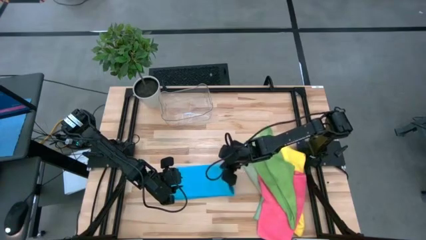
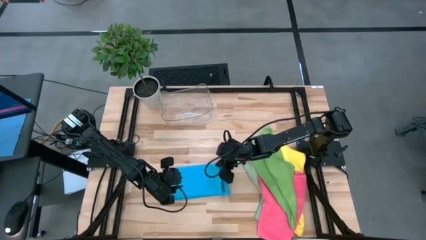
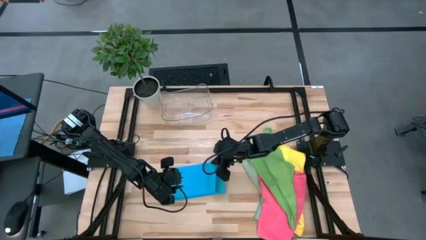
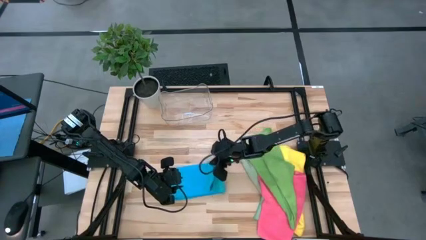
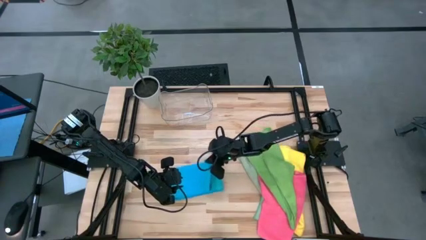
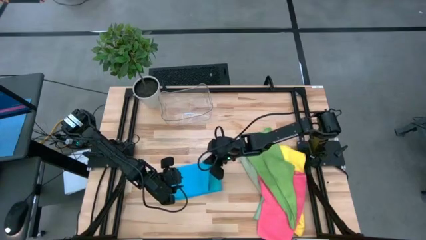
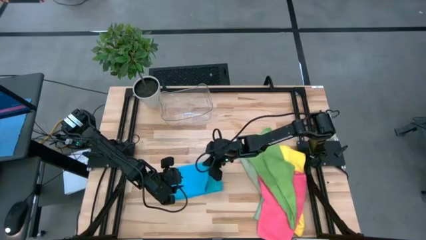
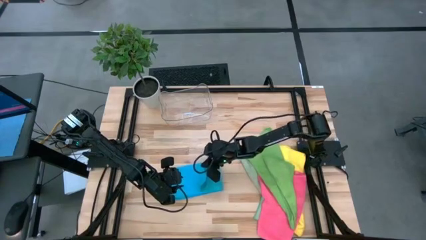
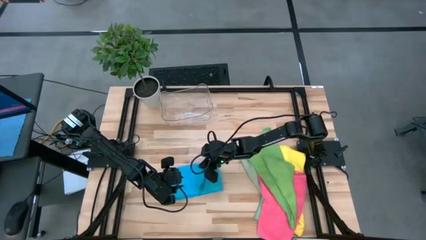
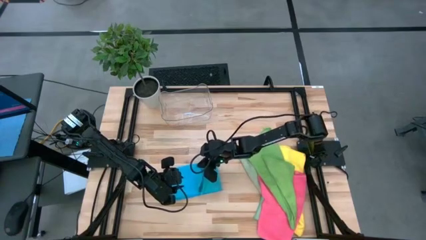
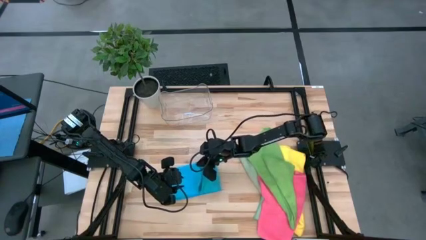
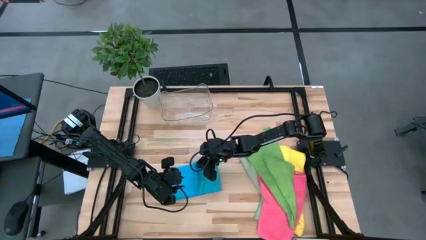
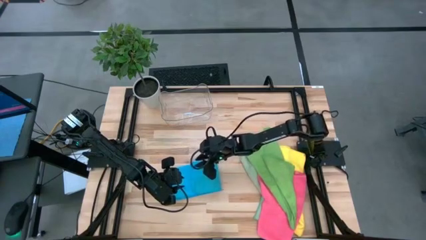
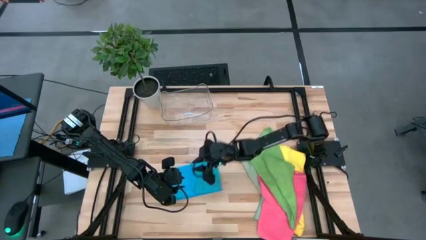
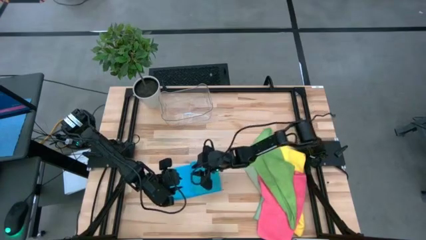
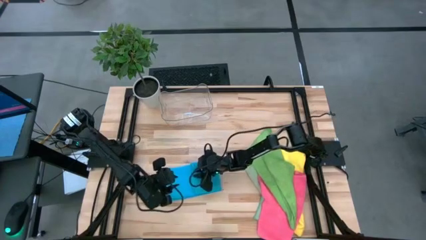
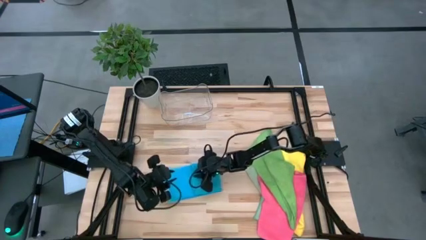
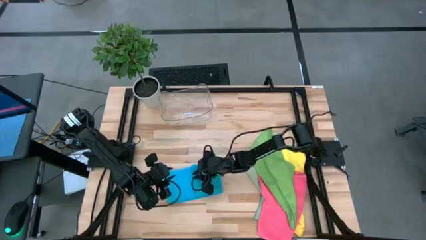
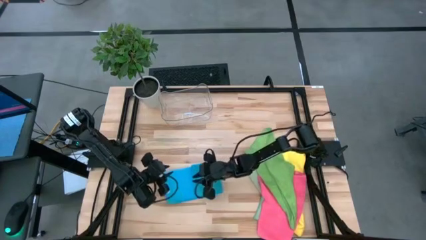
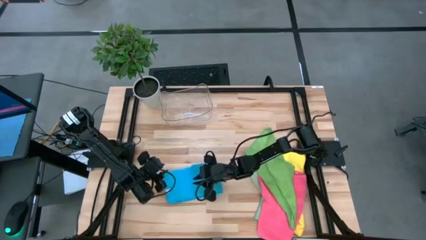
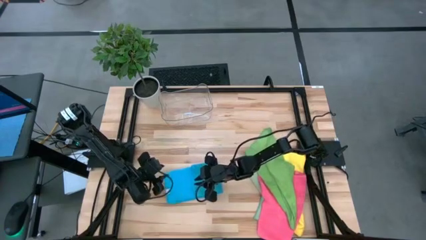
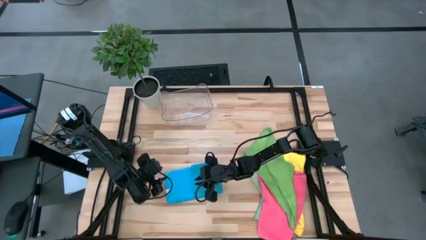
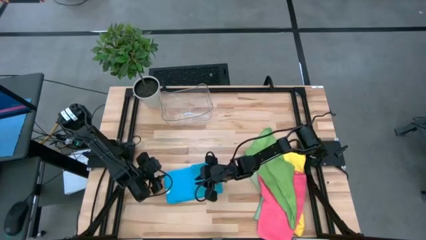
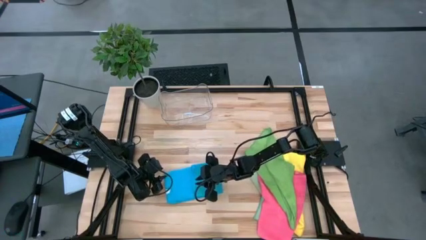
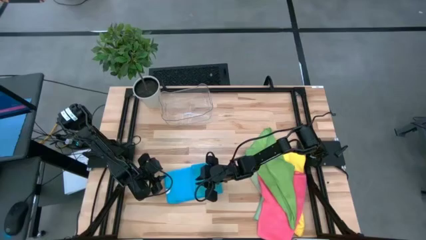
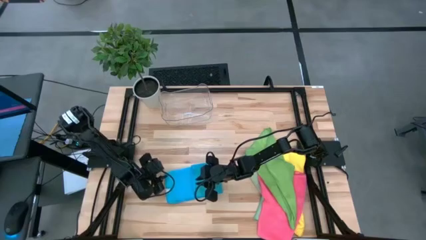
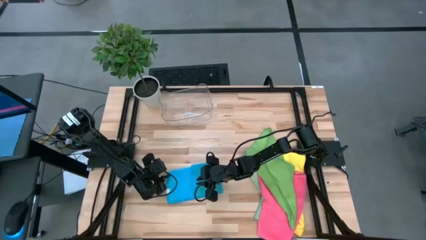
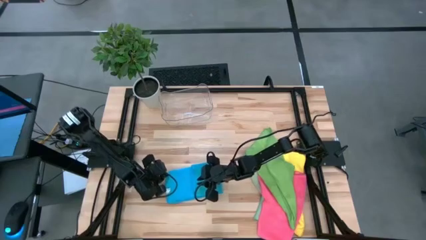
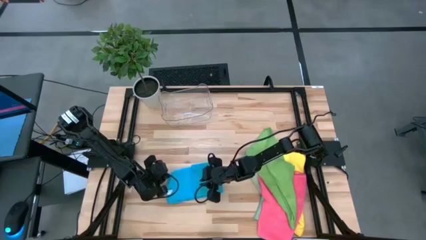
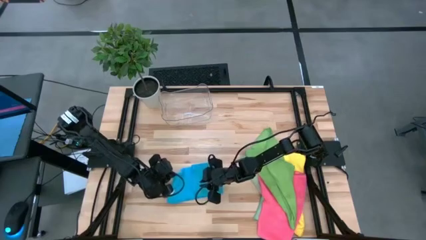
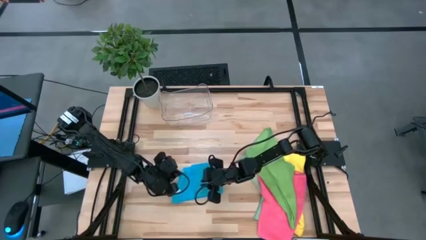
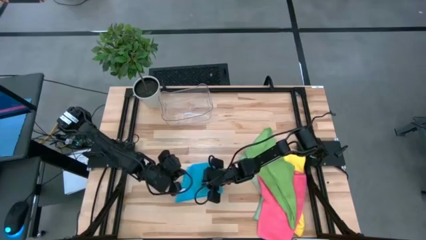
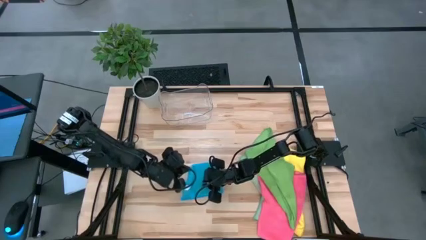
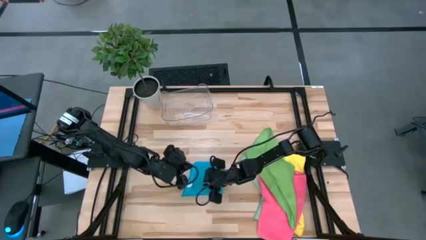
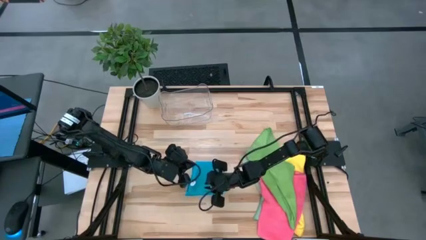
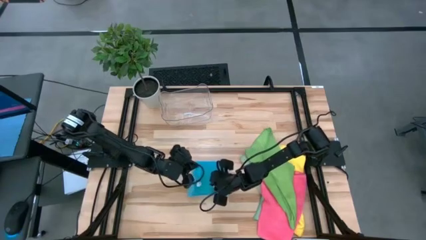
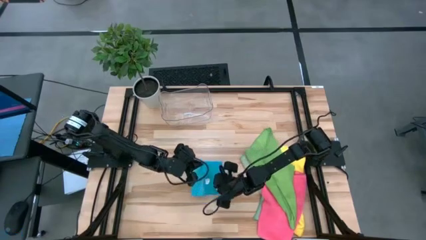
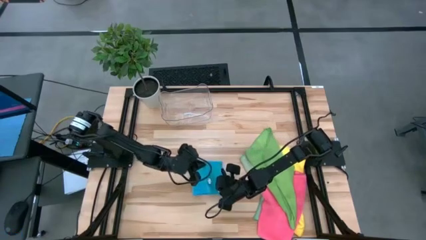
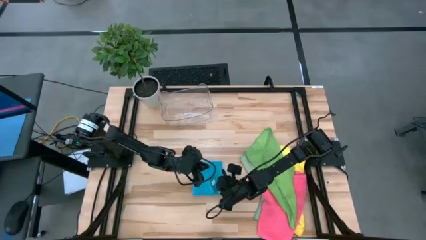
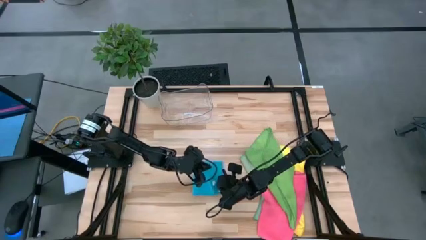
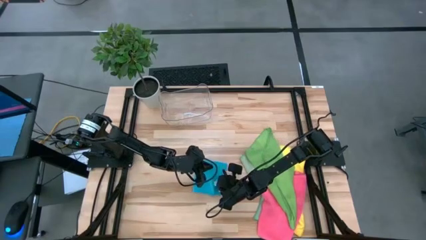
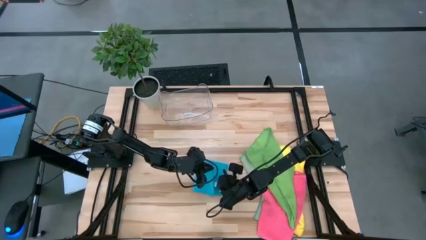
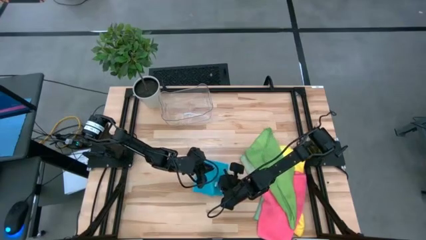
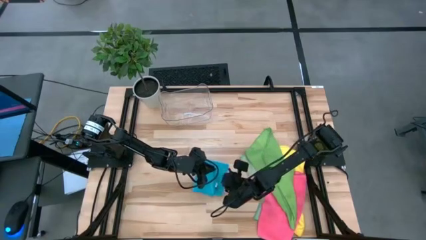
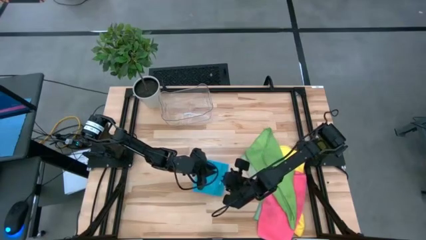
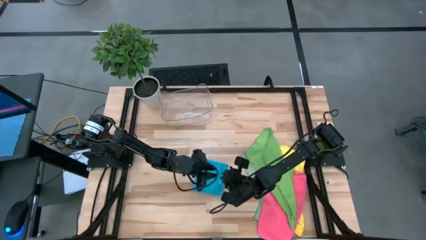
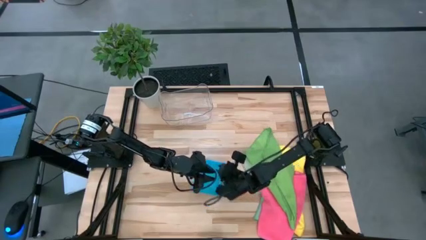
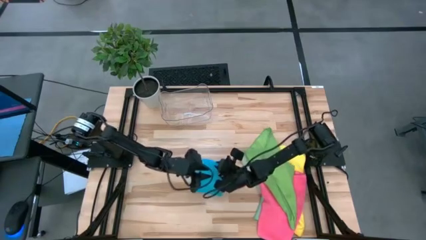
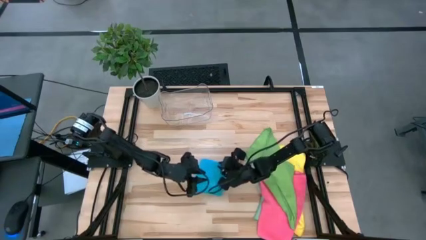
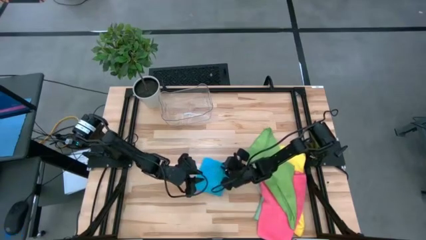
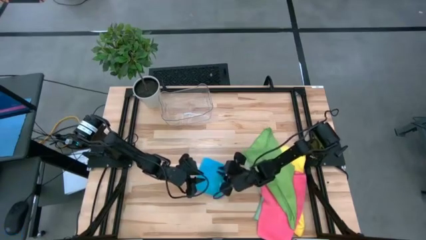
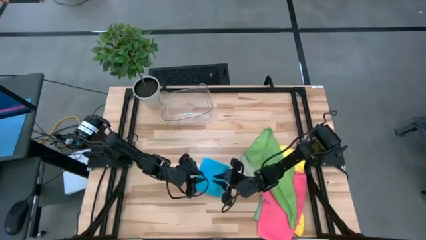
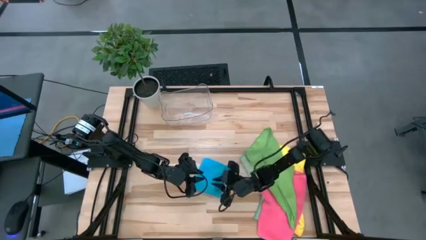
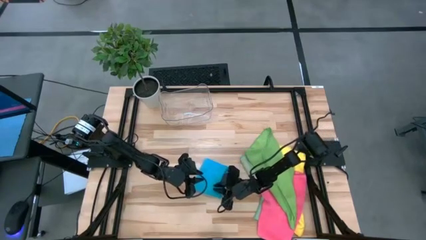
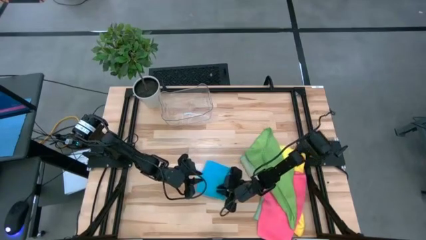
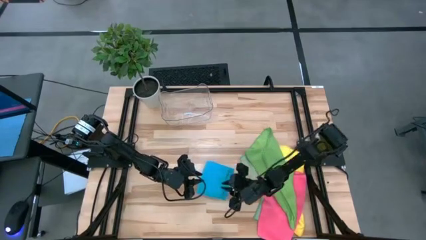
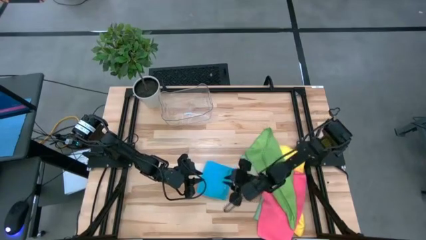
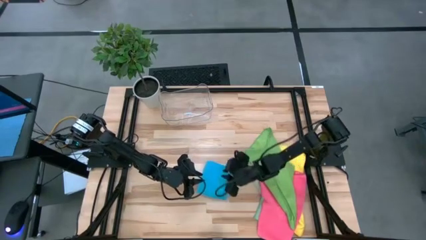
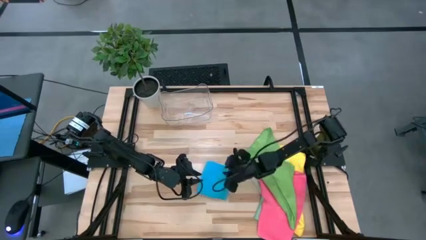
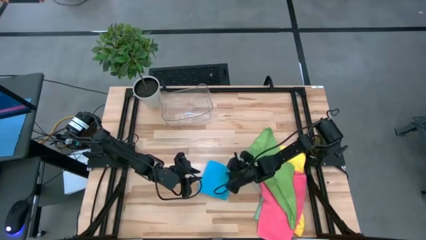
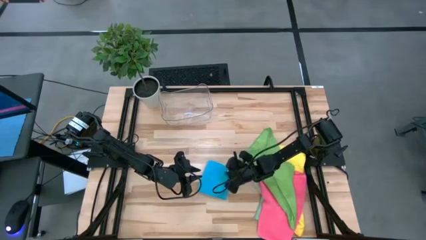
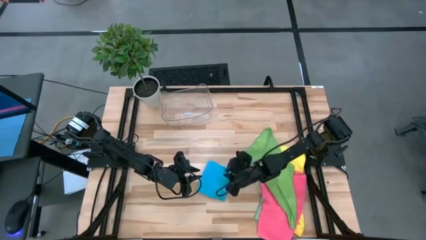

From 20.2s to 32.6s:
Task: Fold microfiber towels
Fold the blue microfiber cloth

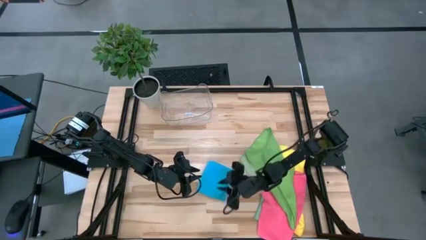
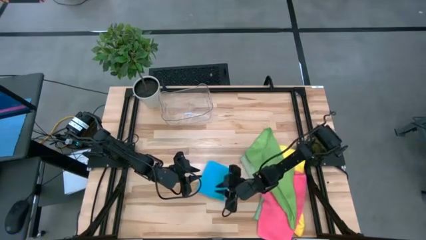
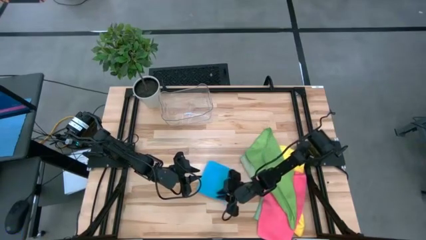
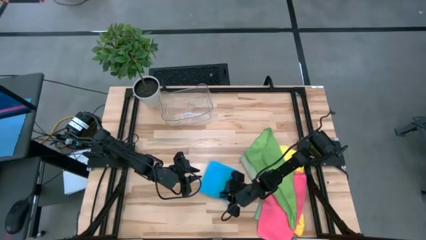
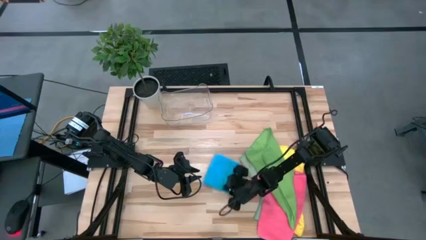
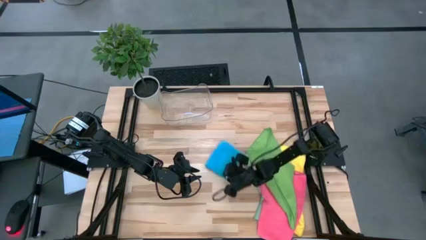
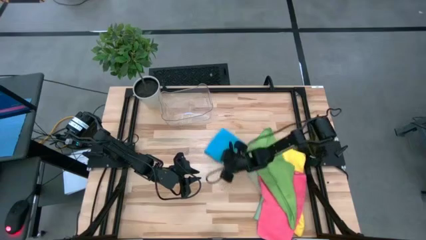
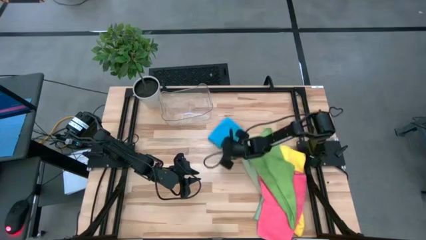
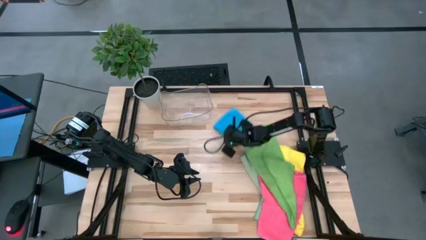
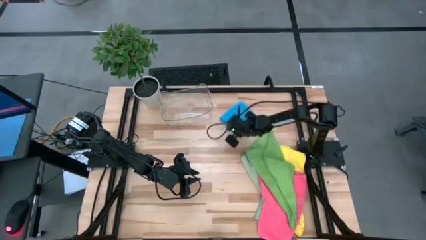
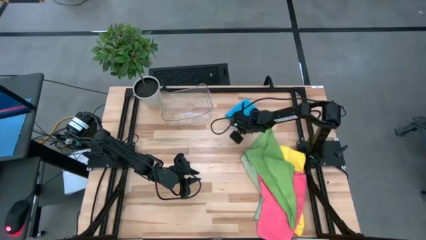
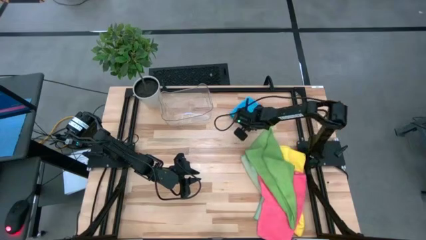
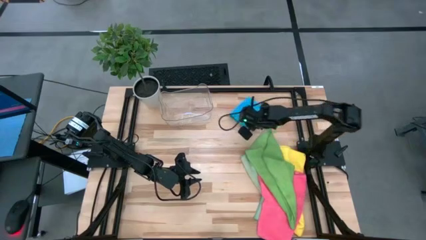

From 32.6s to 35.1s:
Move the blue microfiber cloth to the top right of the table
